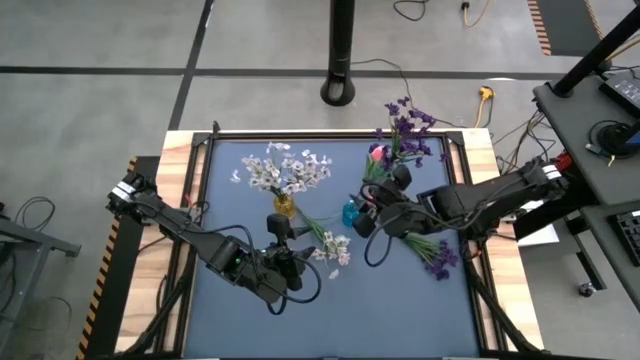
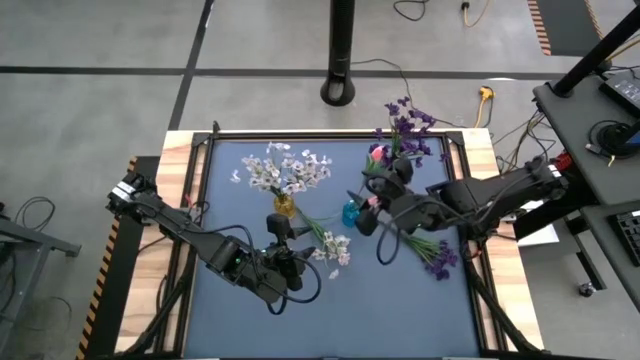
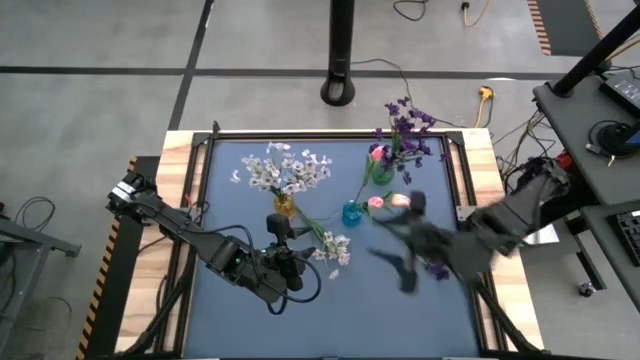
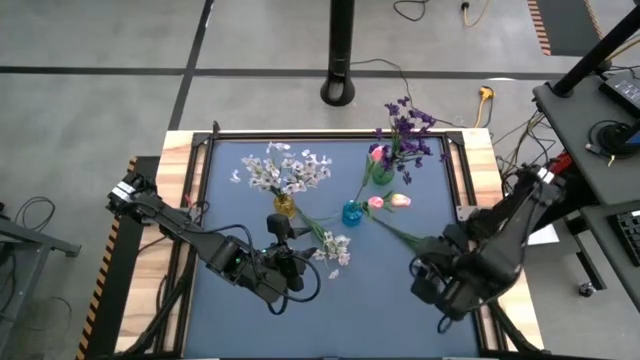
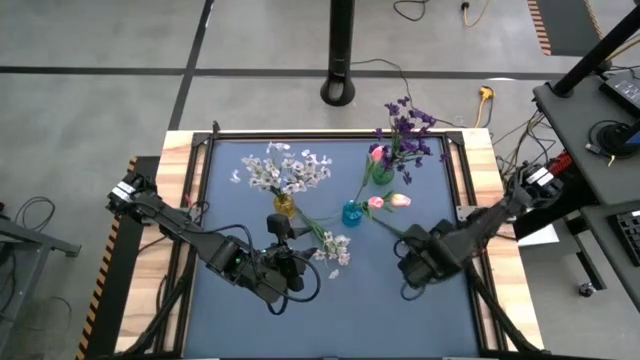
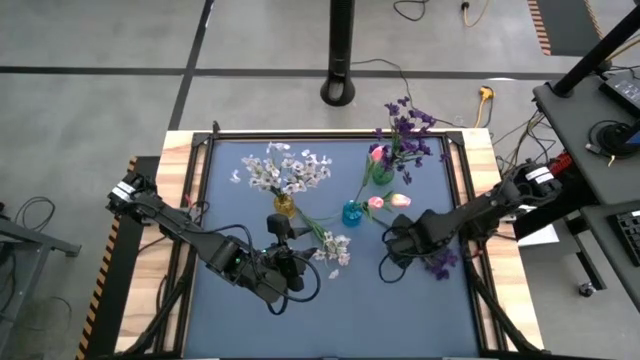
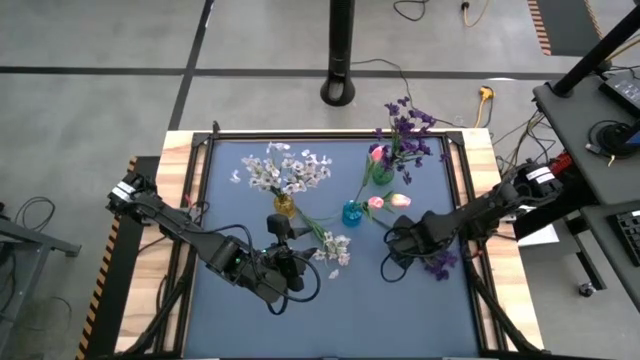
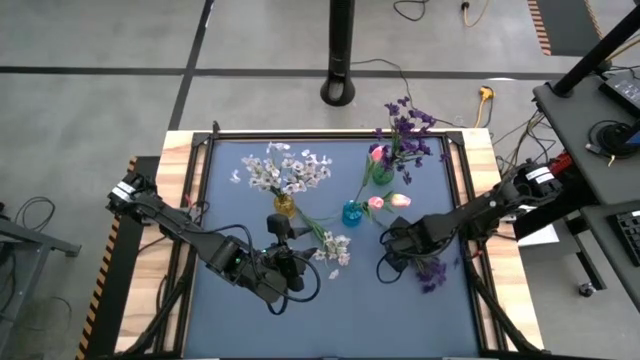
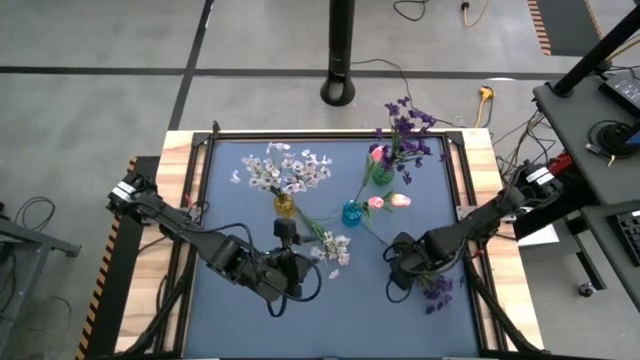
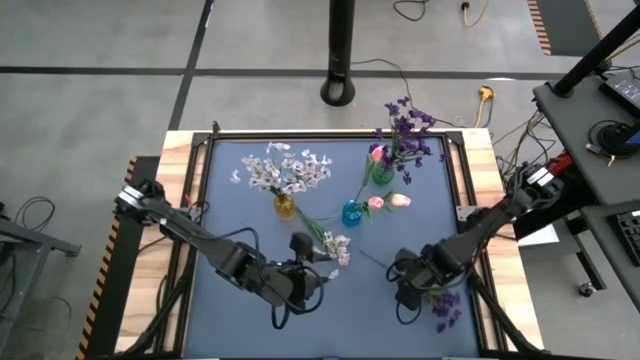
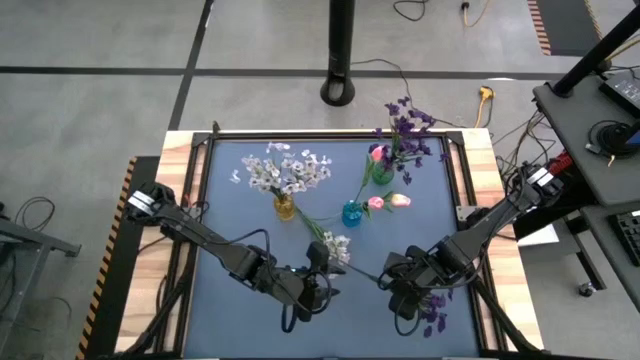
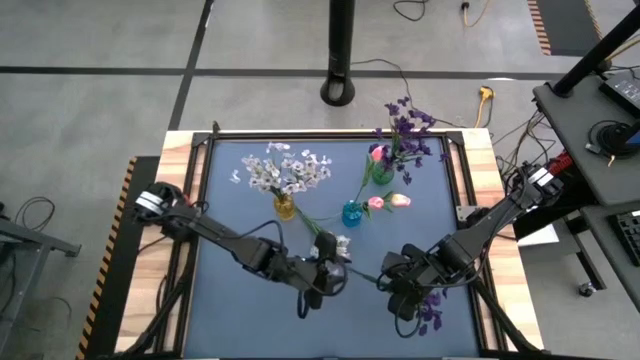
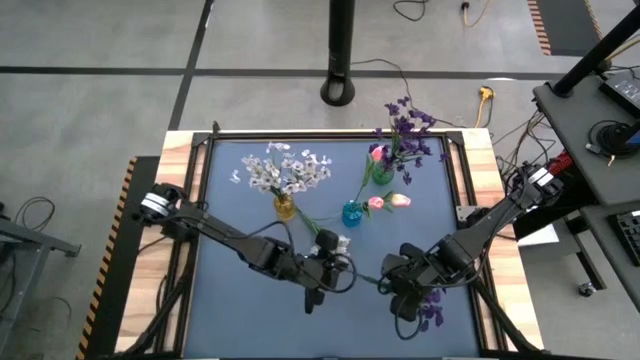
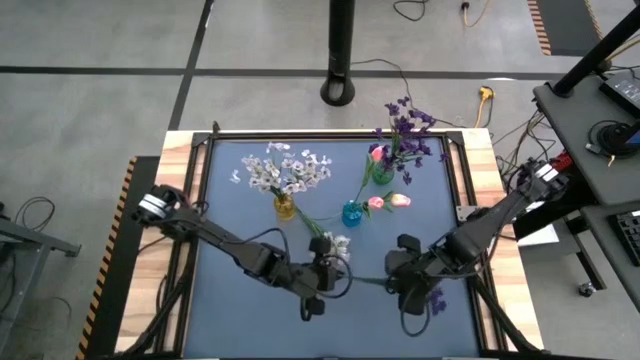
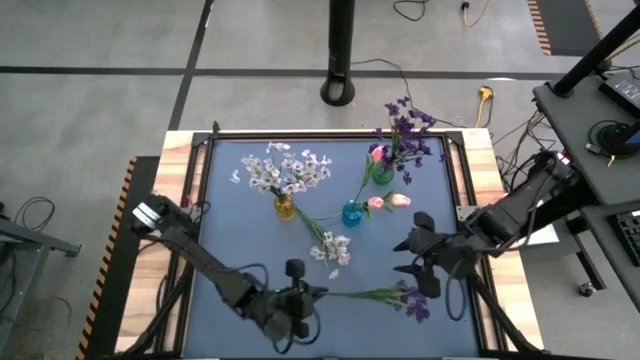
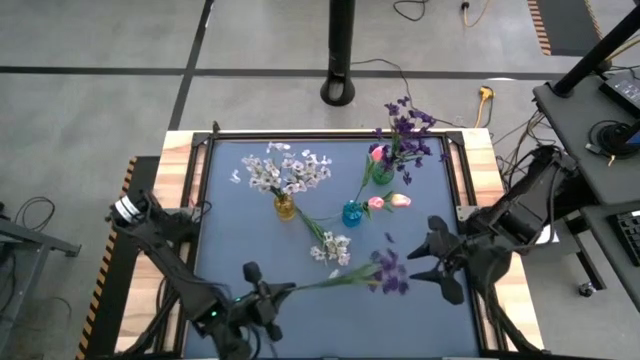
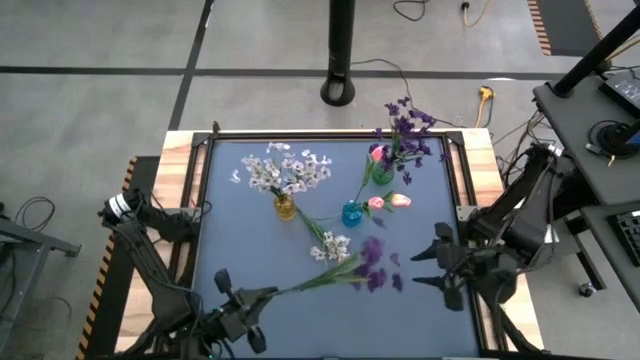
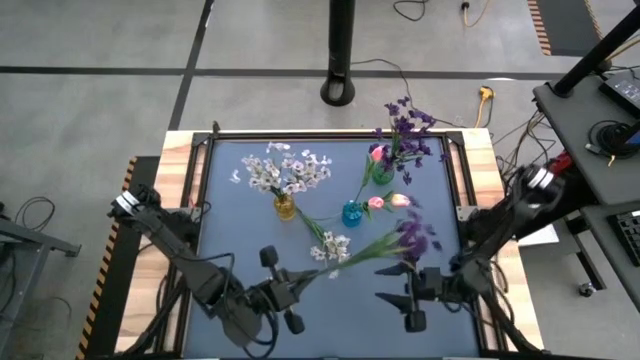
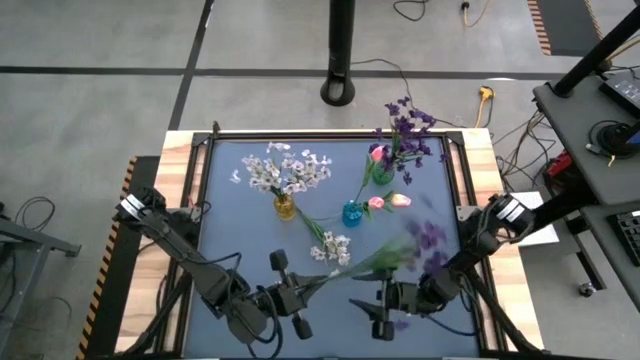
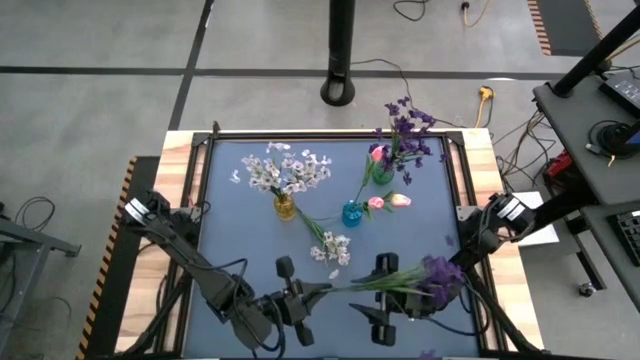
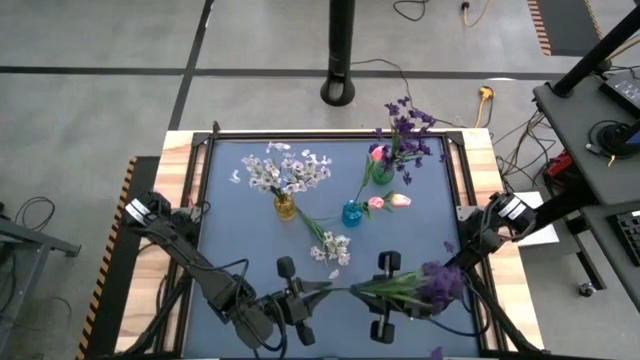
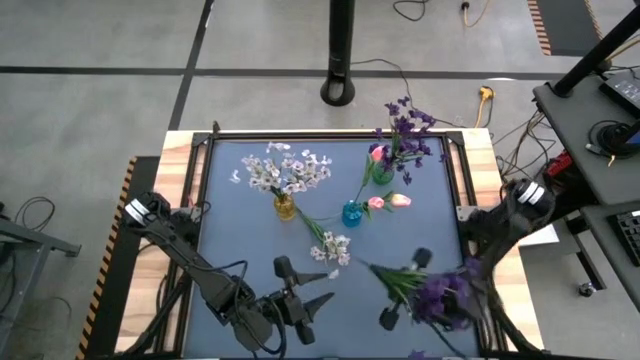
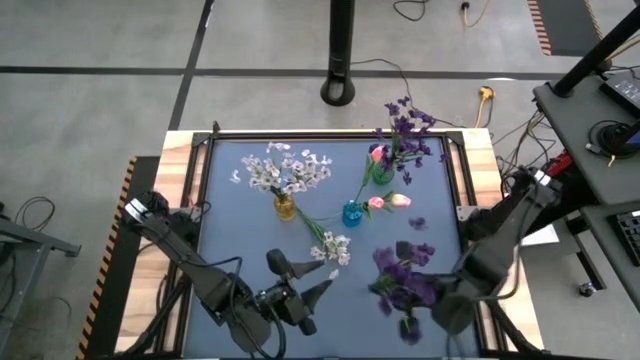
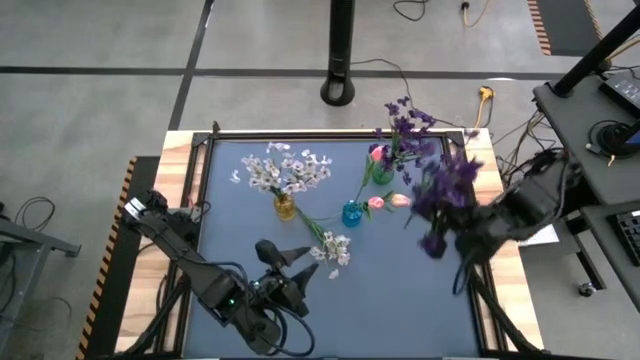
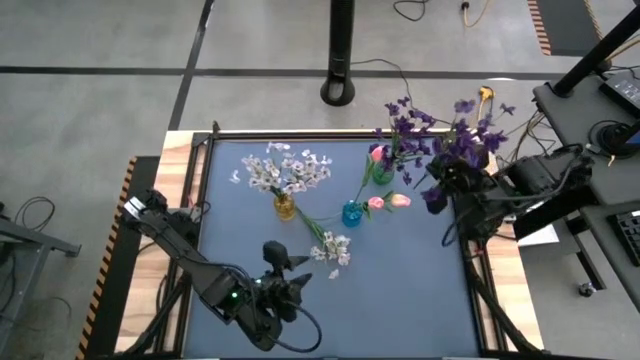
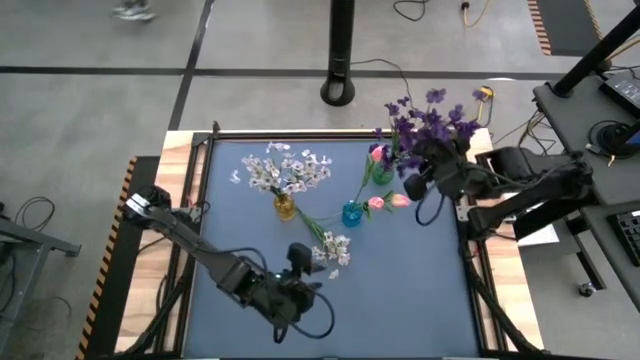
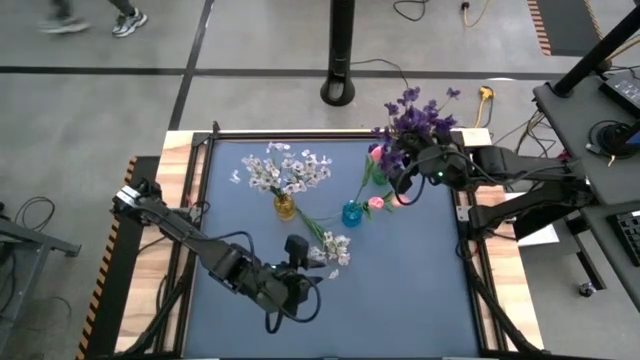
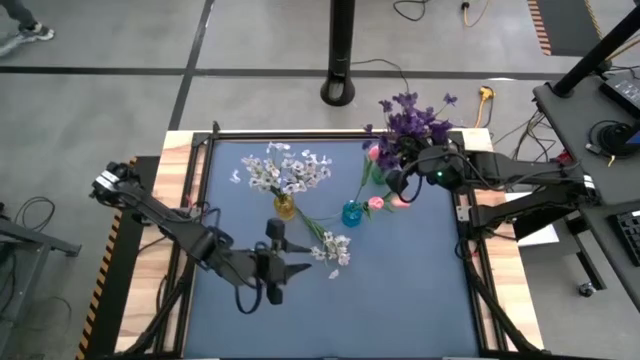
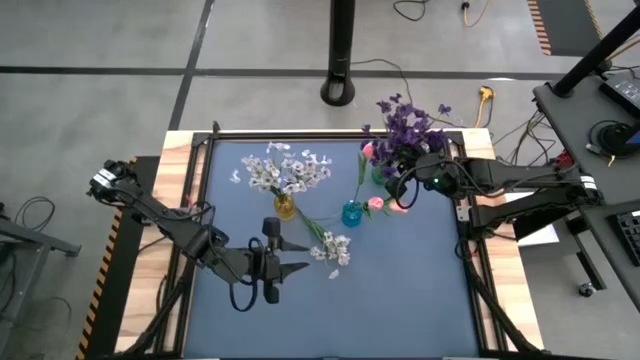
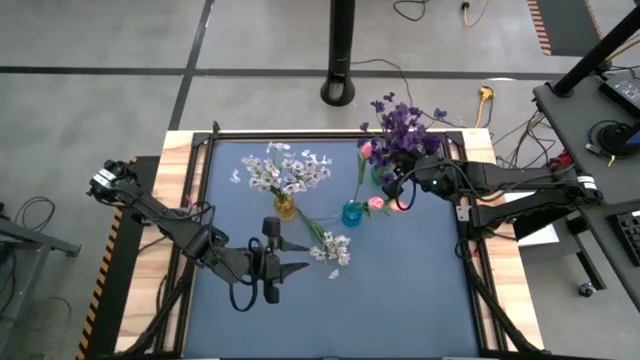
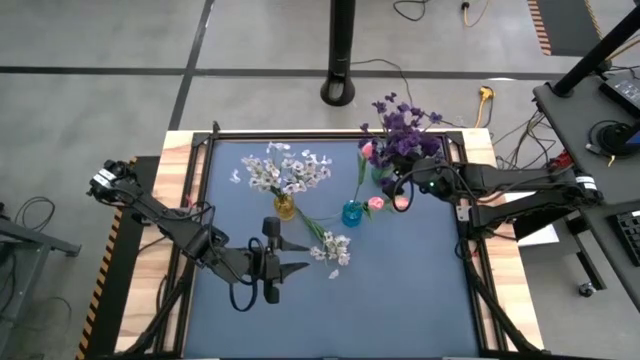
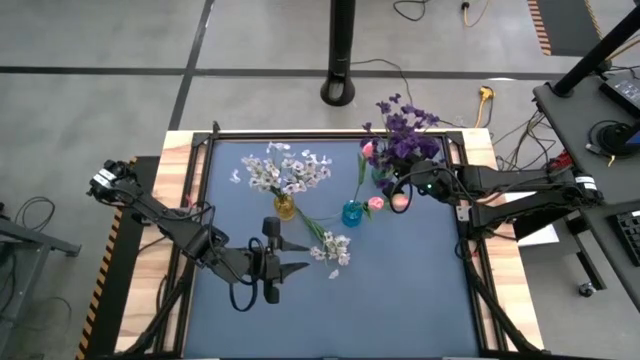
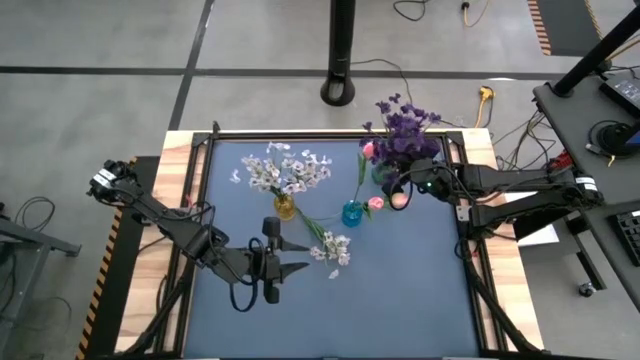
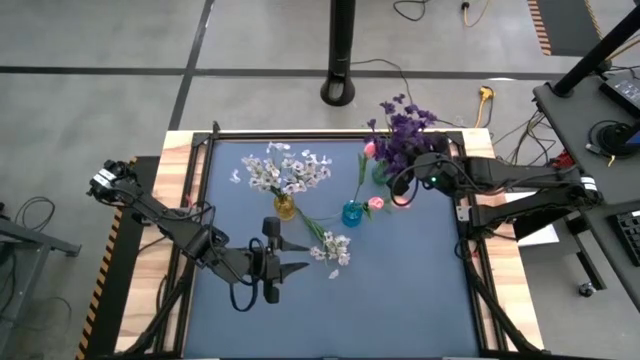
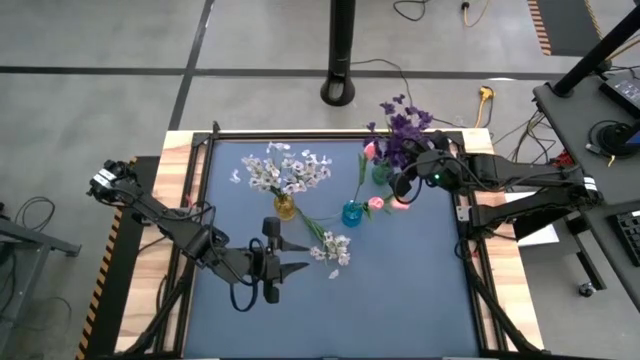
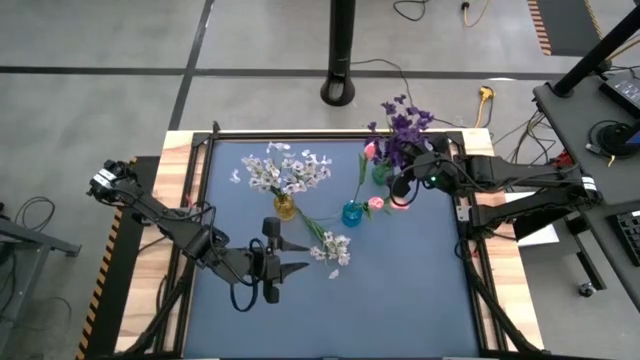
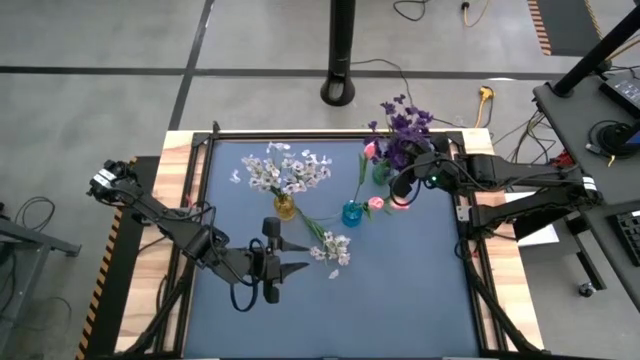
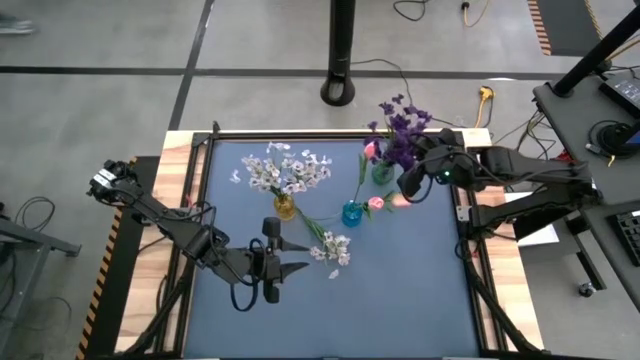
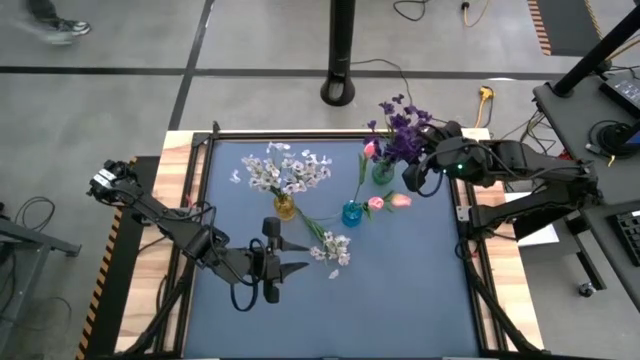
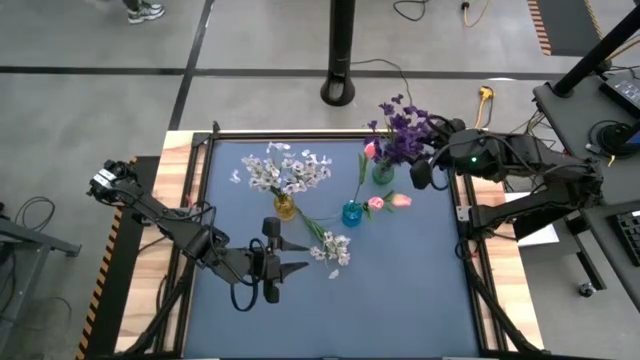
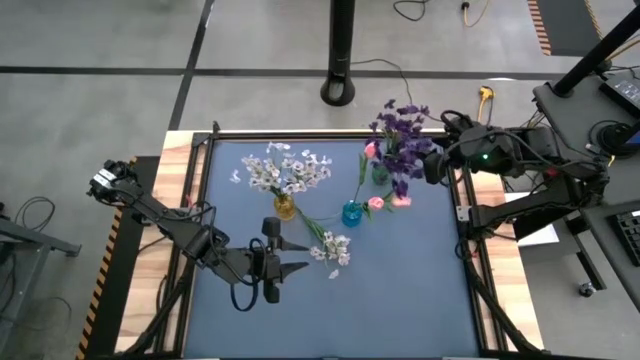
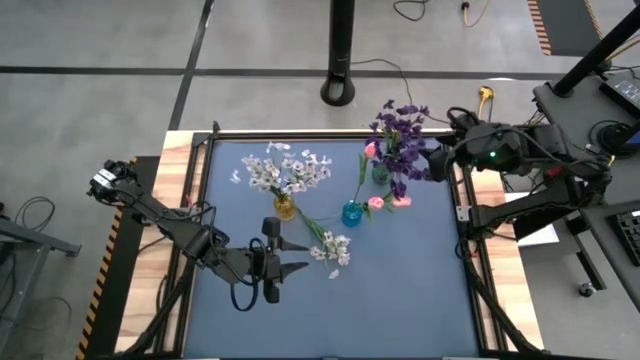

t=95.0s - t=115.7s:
Task: Sort flowers into vase by color
Put the violet flowers into the green flower vase
